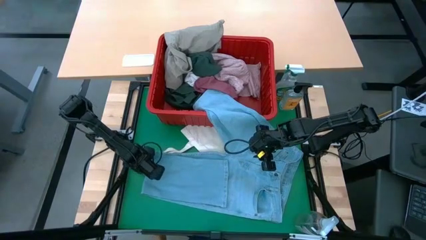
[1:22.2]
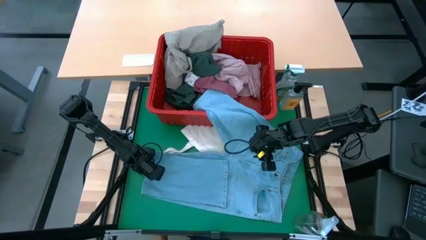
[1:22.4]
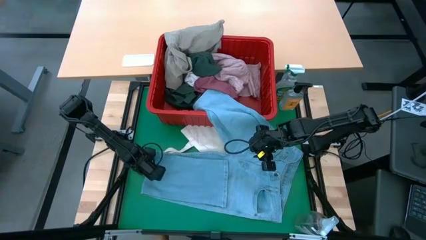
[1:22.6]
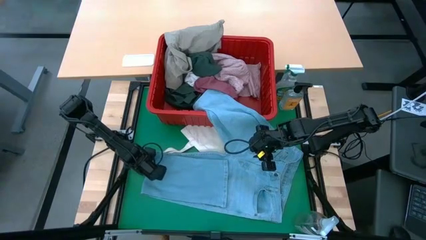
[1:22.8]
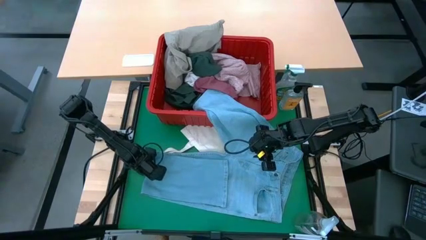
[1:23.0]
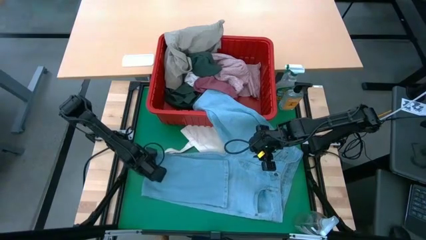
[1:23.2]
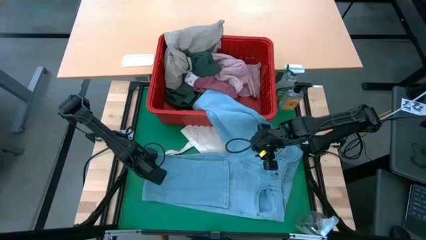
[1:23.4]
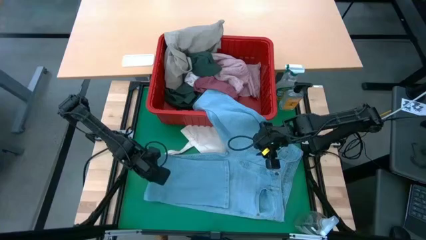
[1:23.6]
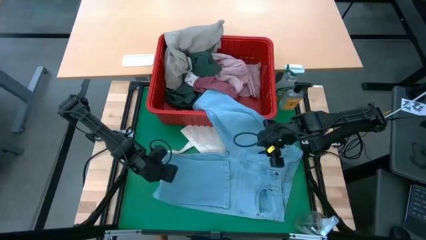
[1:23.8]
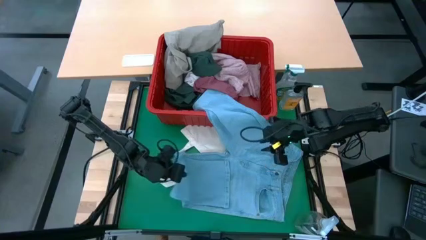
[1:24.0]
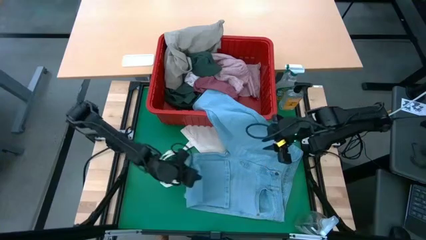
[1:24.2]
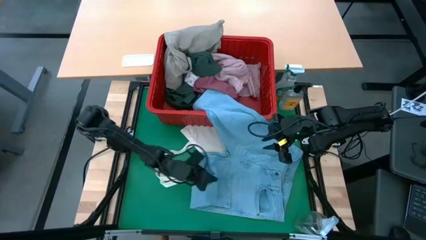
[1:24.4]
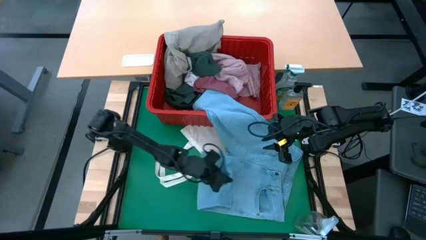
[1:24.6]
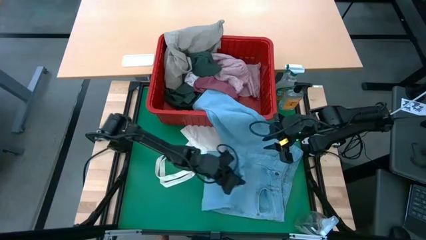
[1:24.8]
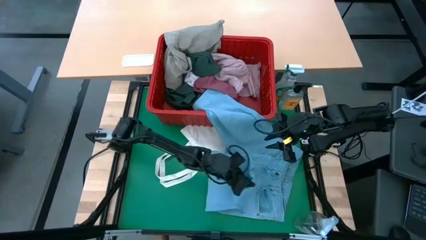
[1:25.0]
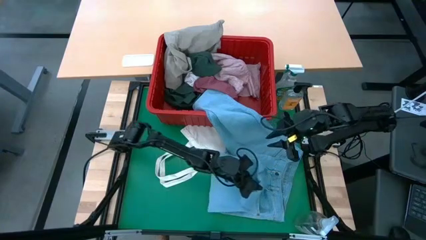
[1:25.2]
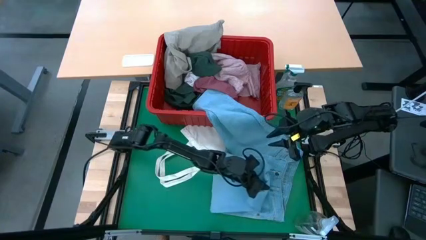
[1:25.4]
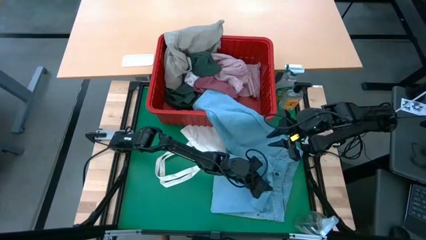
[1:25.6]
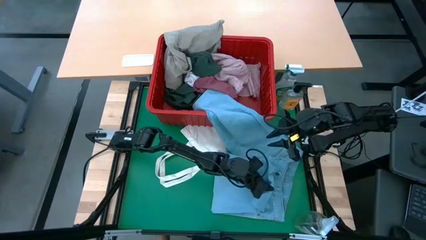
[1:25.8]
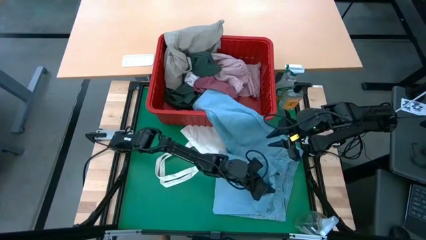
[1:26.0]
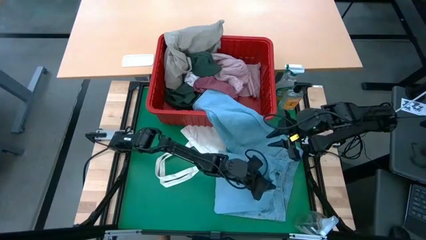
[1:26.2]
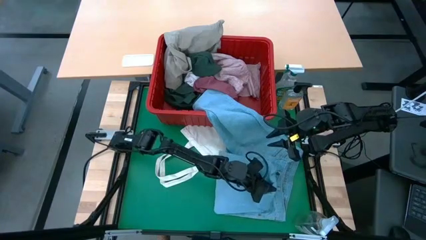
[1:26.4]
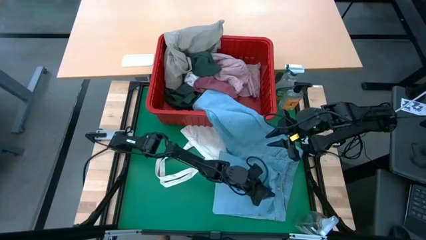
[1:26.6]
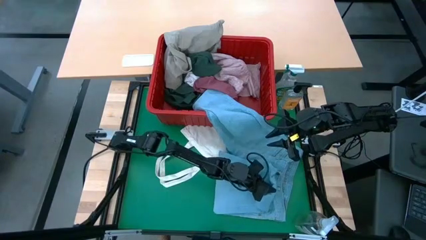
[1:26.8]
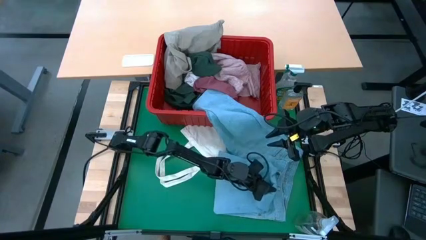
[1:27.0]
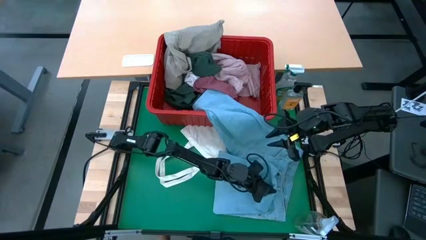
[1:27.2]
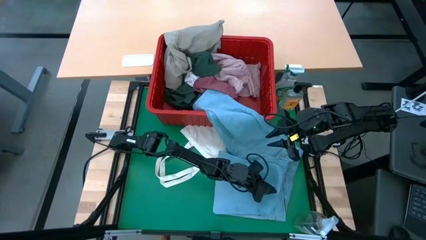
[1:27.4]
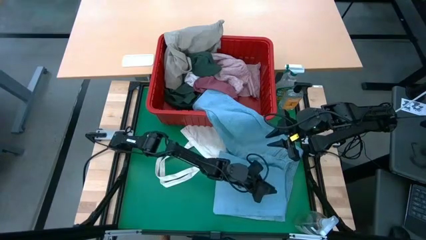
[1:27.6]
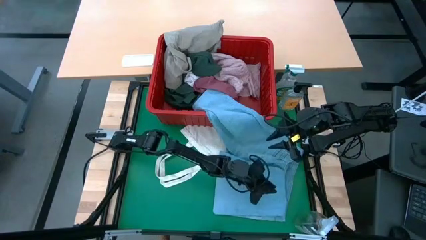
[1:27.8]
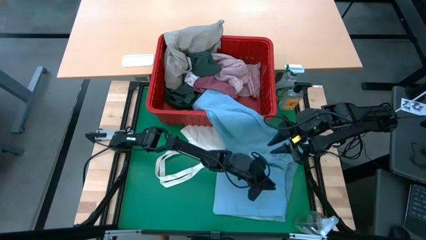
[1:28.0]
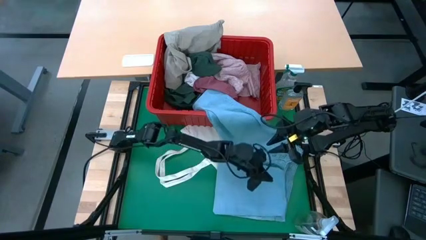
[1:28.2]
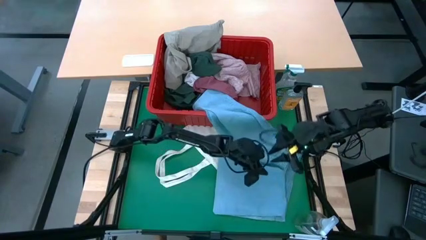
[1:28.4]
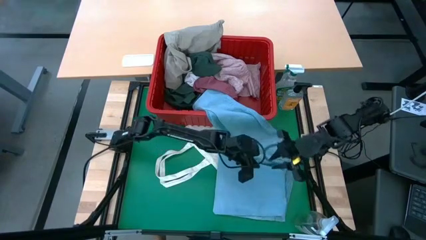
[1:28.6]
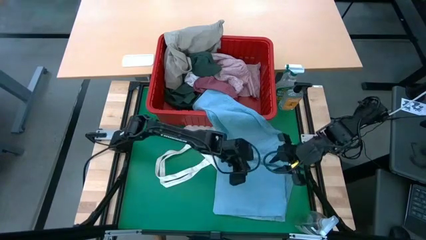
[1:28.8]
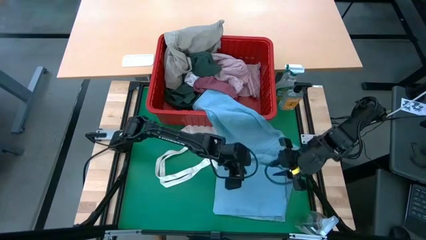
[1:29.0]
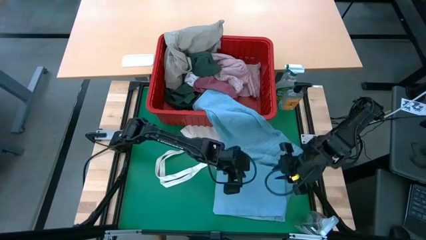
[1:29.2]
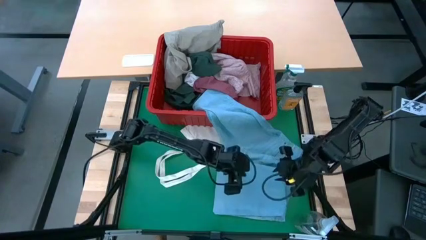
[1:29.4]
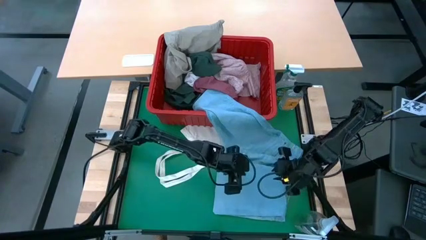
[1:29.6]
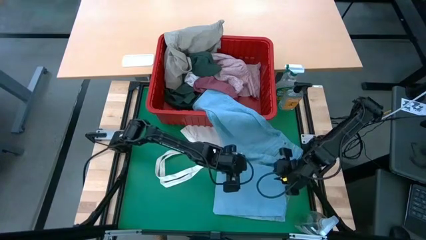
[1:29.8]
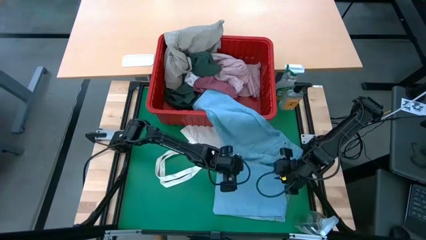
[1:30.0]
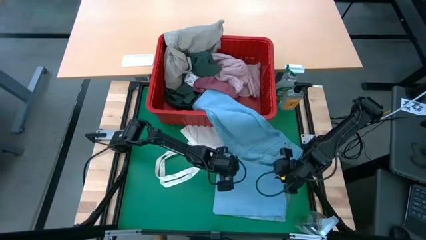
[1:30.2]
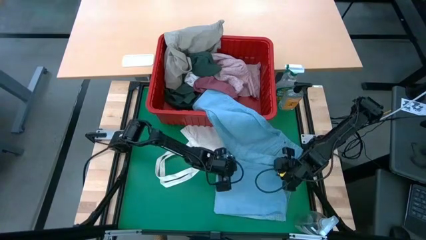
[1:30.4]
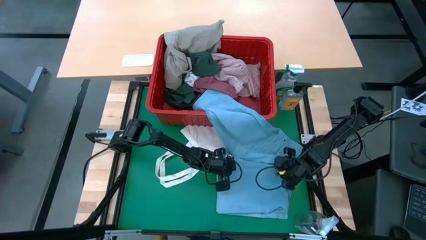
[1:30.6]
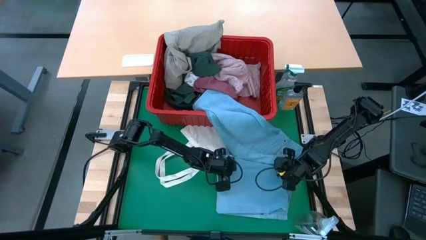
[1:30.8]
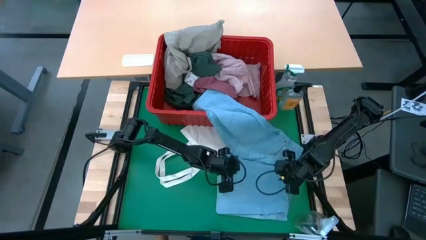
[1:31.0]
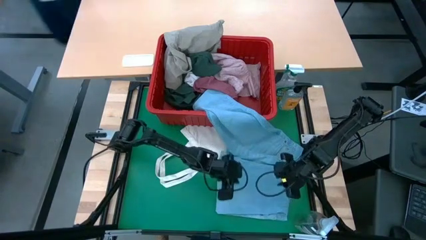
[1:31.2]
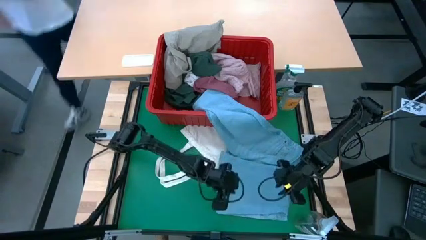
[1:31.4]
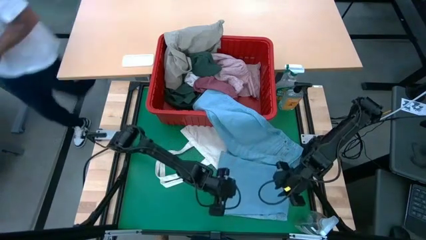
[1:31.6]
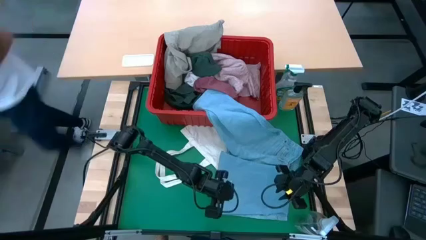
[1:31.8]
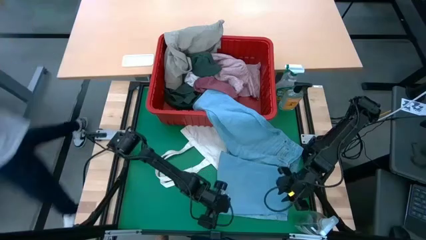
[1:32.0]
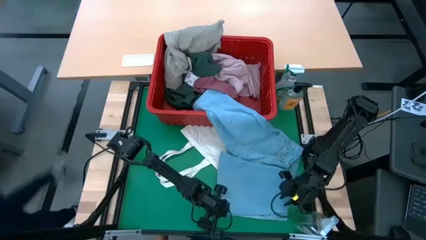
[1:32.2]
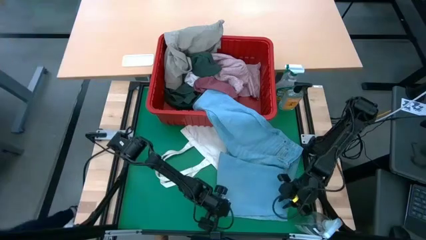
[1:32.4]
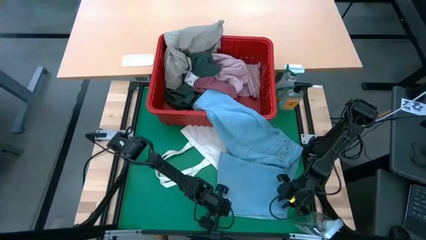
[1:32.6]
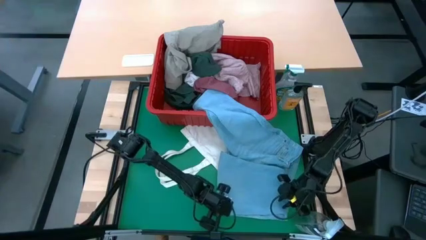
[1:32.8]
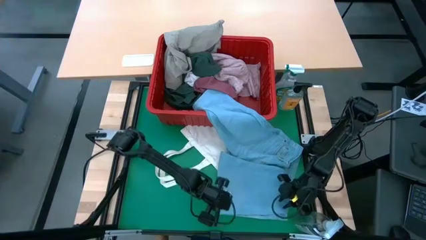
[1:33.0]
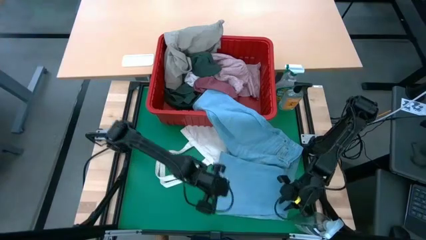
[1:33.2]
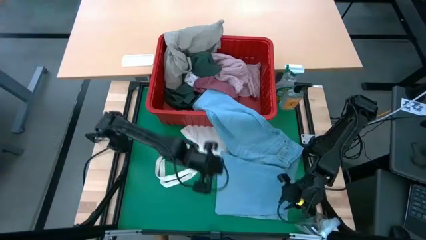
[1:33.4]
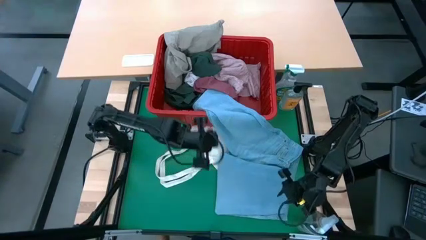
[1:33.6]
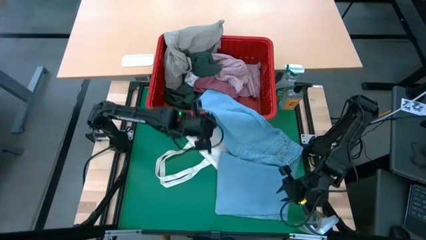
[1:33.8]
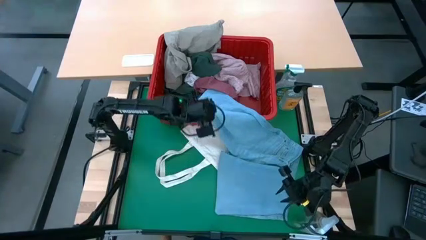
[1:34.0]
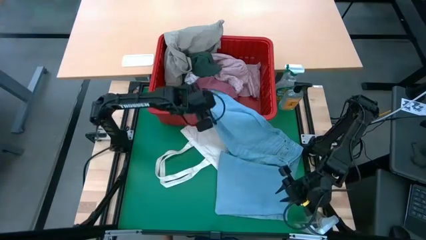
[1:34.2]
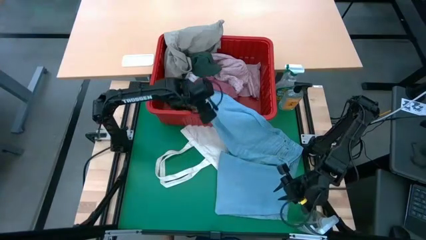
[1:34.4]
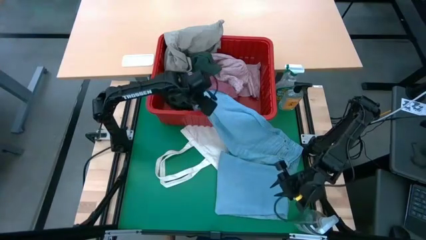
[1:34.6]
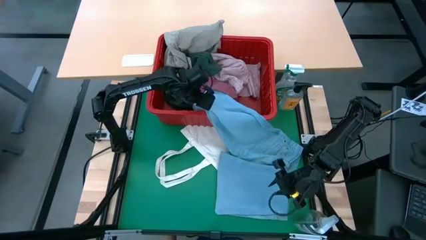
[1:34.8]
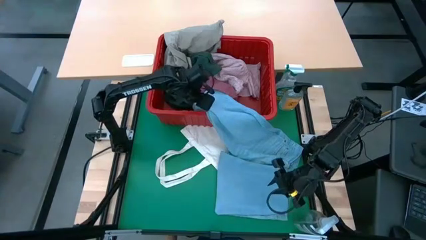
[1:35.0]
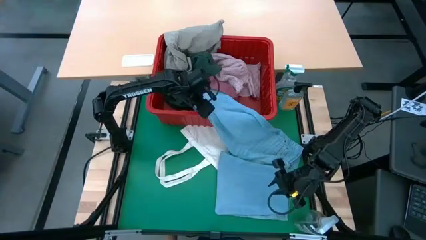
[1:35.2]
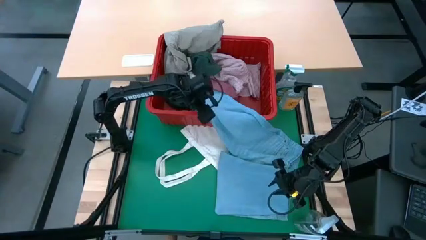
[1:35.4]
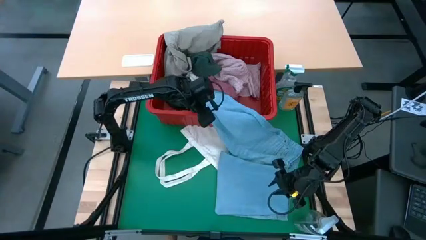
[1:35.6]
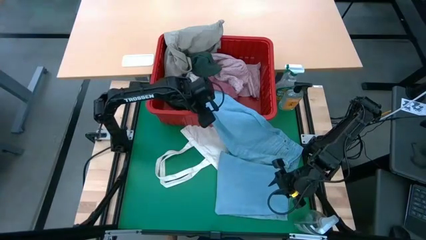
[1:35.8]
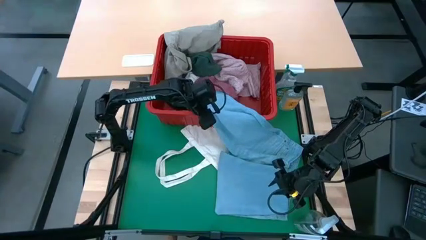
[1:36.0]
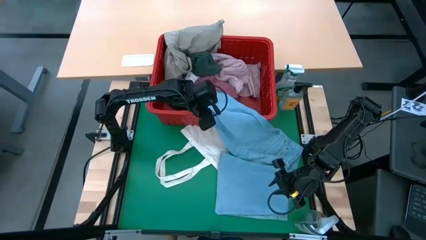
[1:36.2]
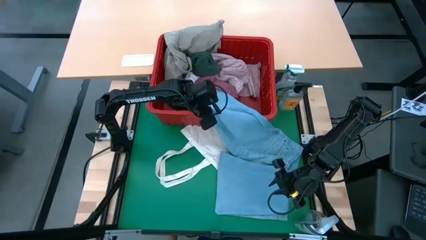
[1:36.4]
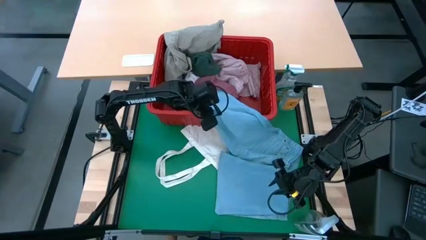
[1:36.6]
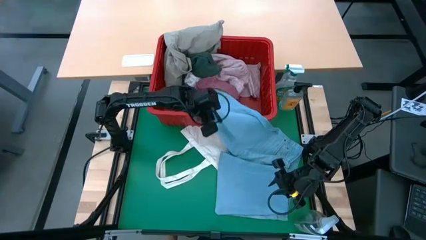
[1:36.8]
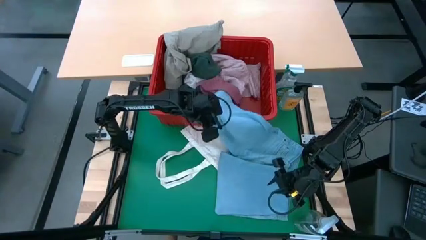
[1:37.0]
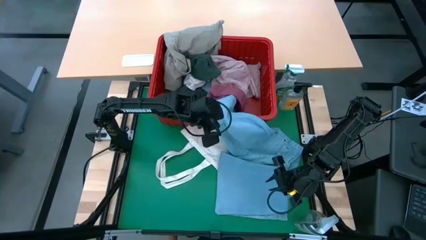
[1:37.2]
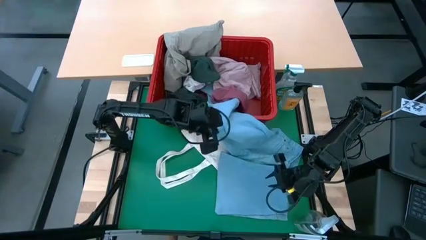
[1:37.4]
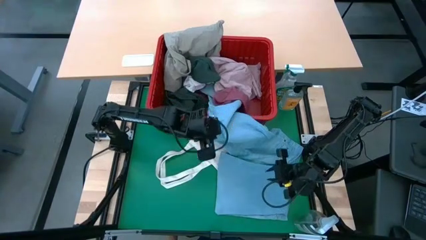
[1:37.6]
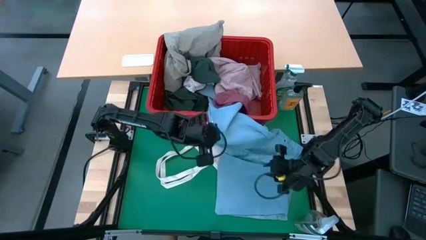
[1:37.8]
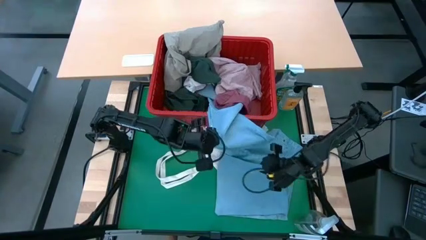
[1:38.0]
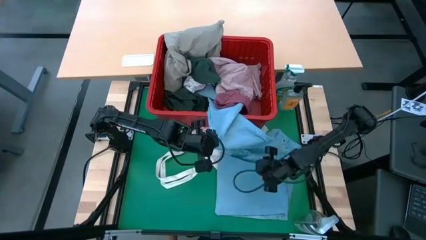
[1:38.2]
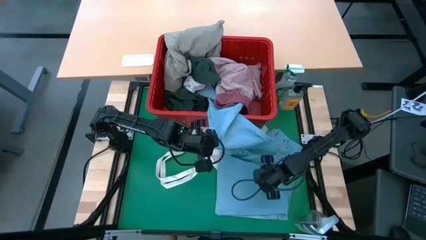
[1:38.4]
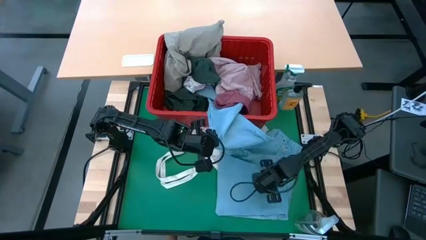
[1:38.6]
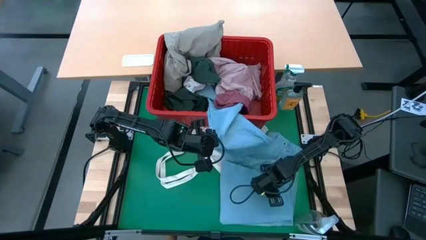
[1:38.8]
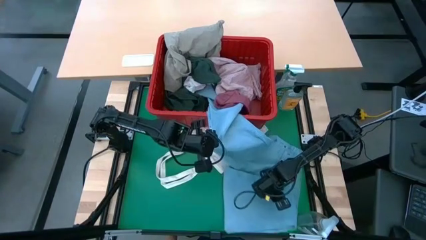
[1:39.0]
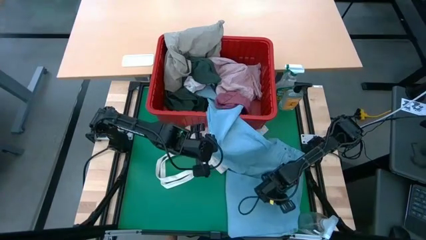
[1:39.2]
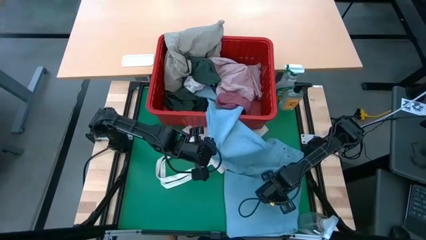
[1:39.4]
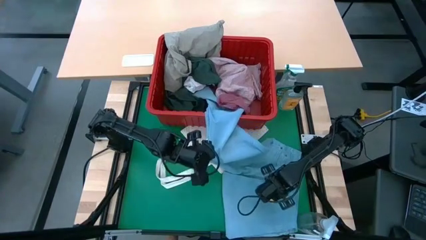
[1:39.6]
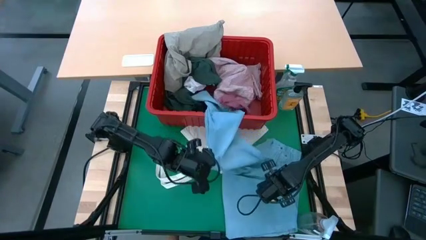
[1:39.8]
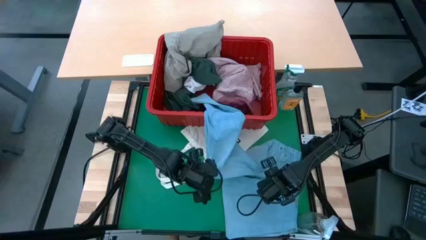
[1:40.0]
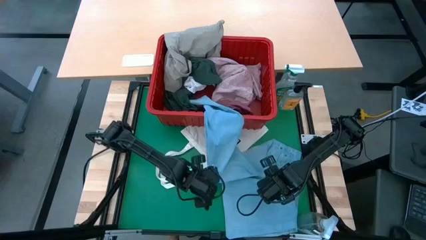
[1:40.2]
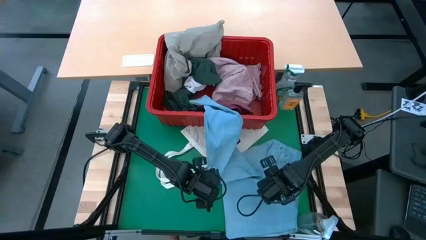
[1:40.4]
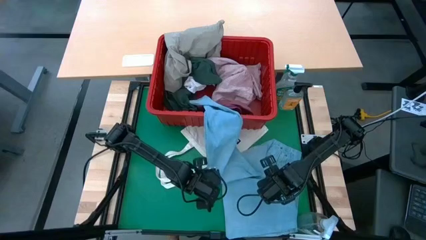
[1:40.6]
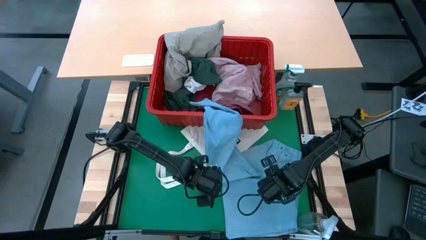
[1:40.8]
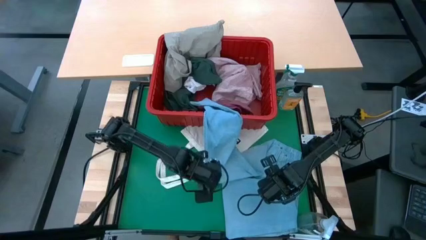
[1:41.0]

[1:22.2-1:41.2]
Task: Fold laundry
Fold the blue jeans
